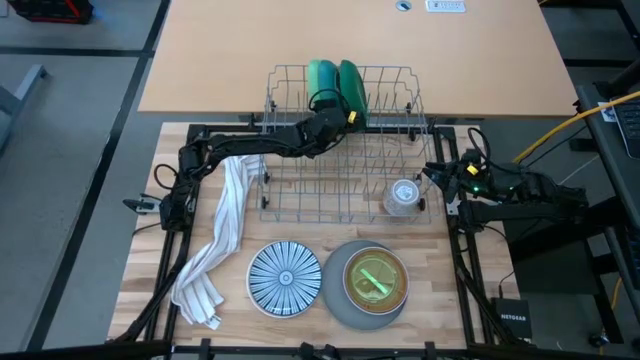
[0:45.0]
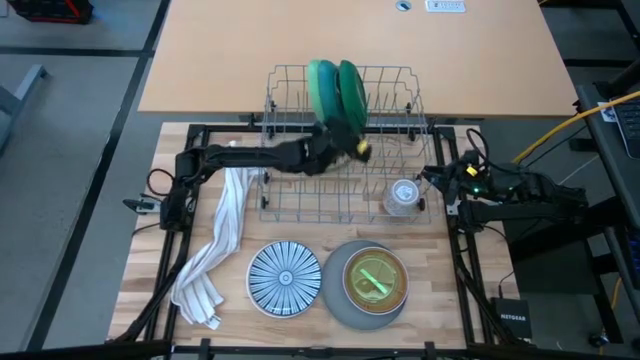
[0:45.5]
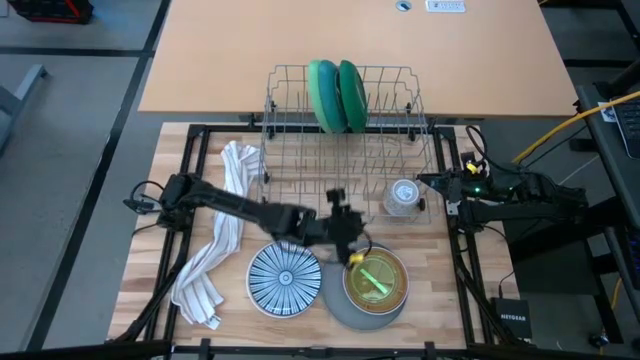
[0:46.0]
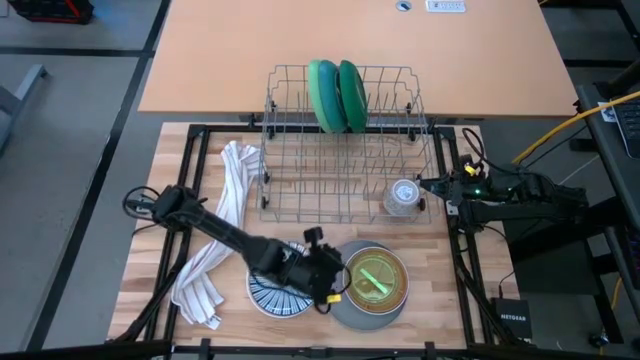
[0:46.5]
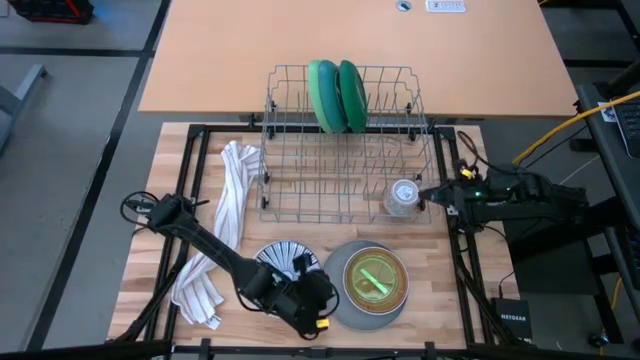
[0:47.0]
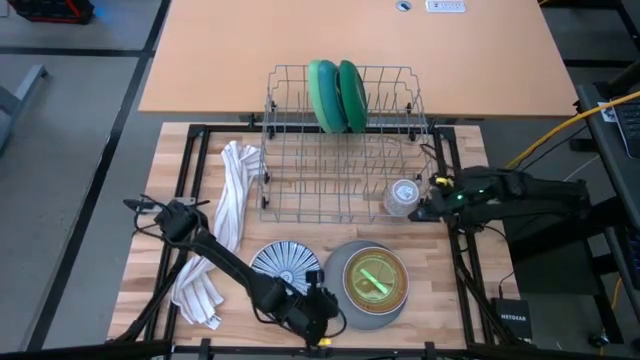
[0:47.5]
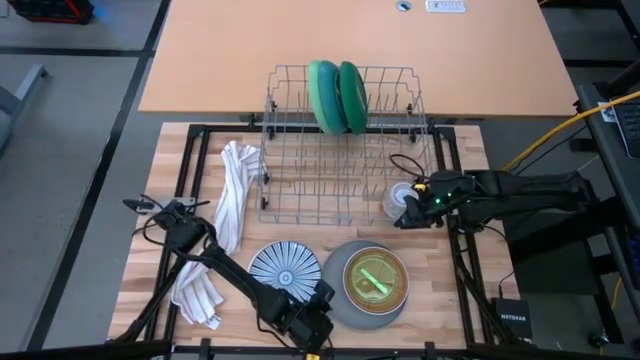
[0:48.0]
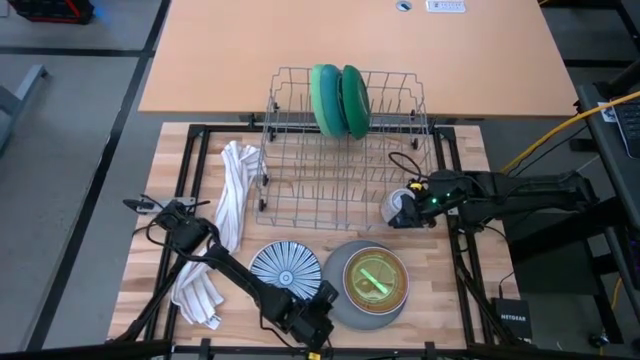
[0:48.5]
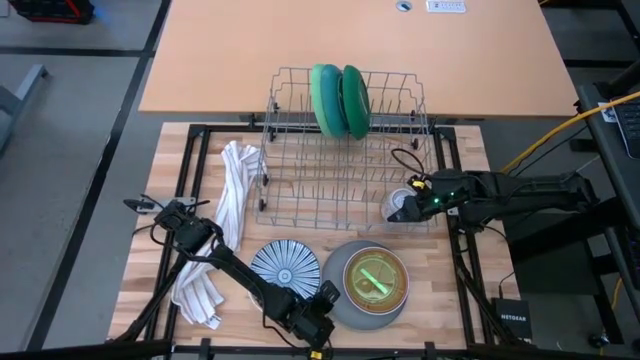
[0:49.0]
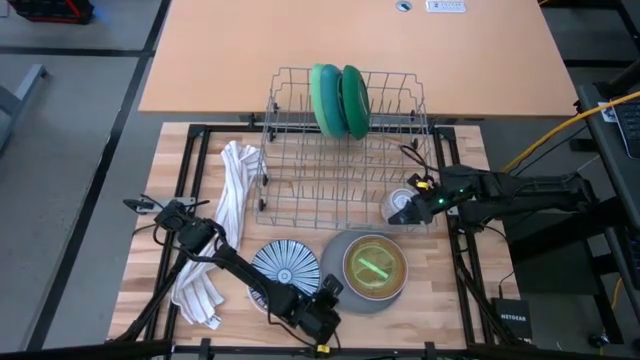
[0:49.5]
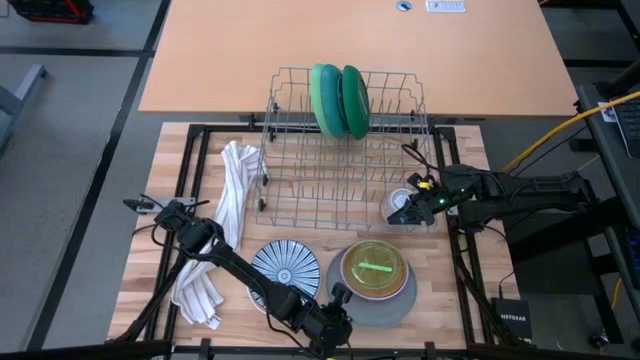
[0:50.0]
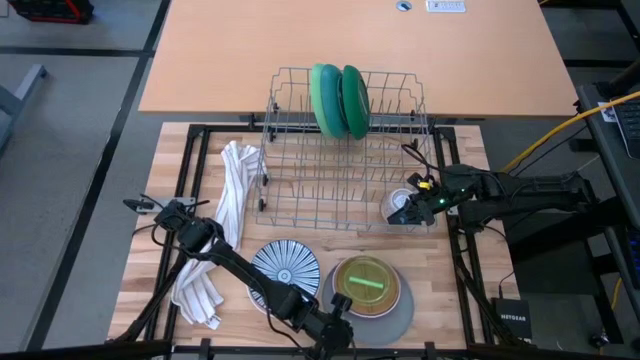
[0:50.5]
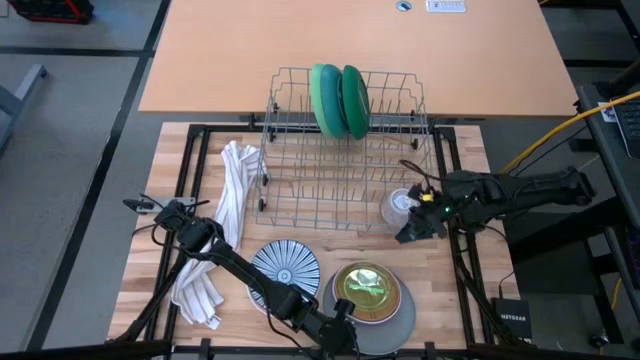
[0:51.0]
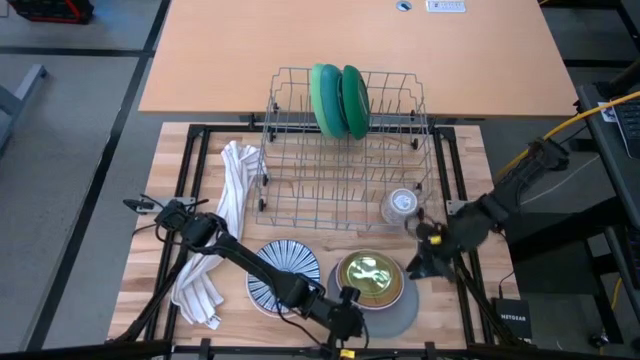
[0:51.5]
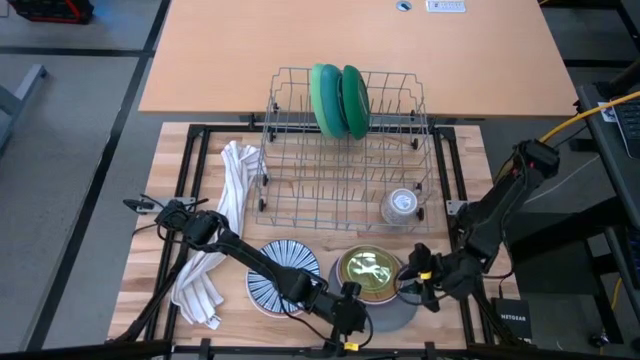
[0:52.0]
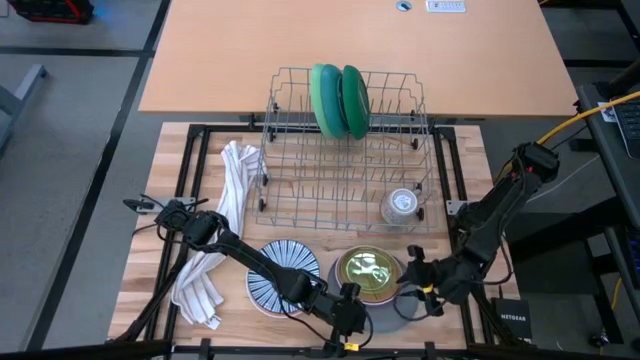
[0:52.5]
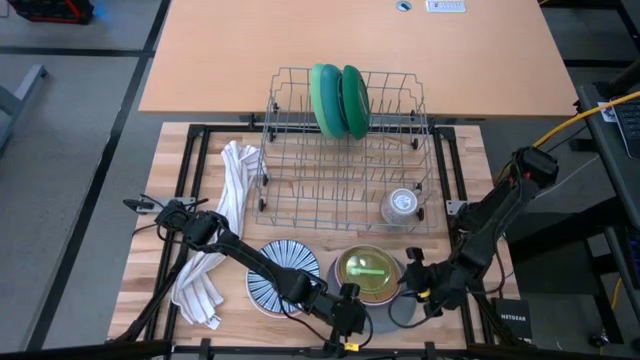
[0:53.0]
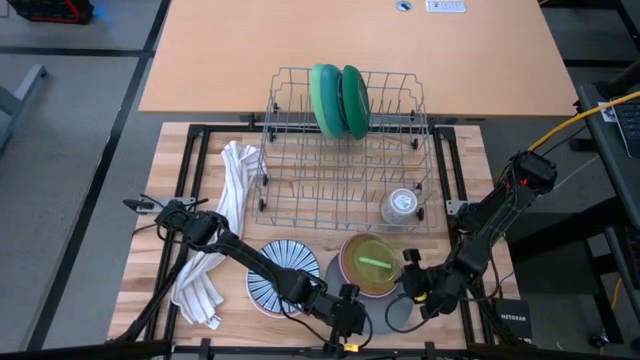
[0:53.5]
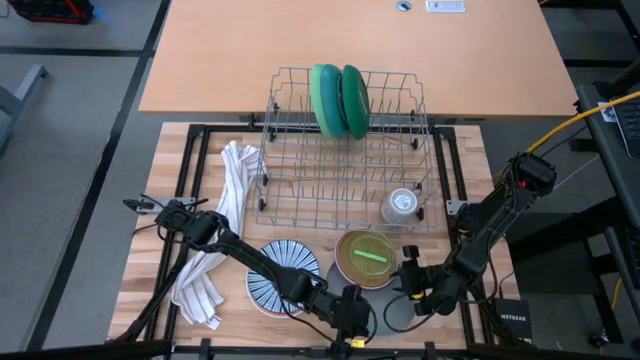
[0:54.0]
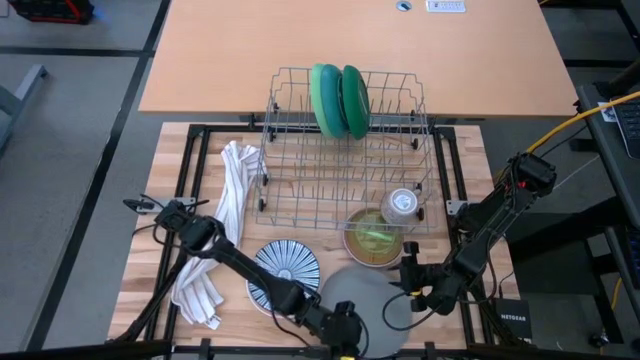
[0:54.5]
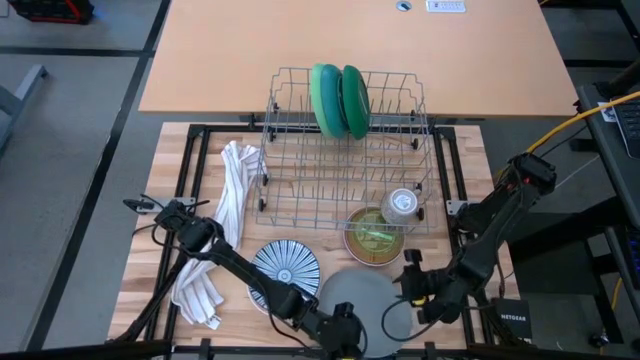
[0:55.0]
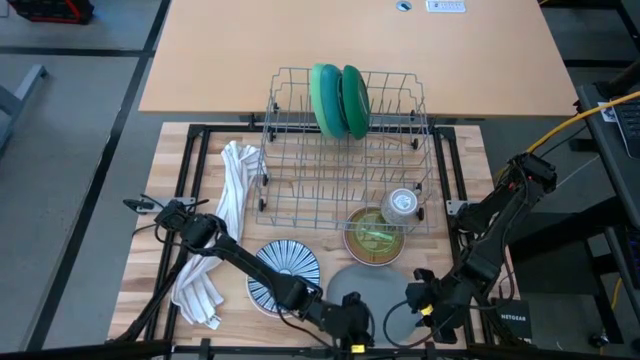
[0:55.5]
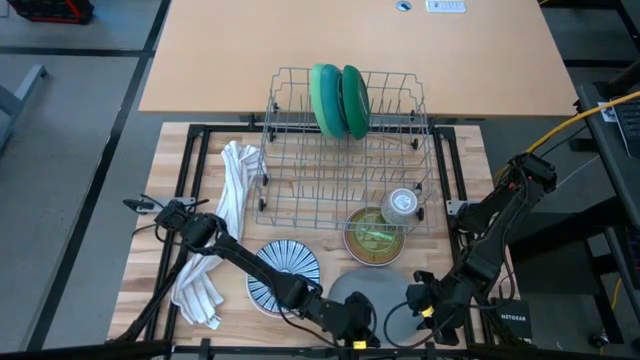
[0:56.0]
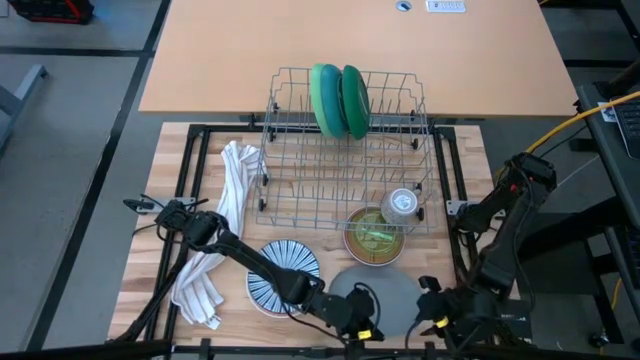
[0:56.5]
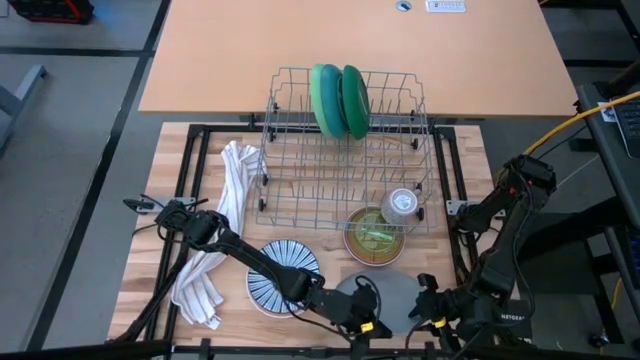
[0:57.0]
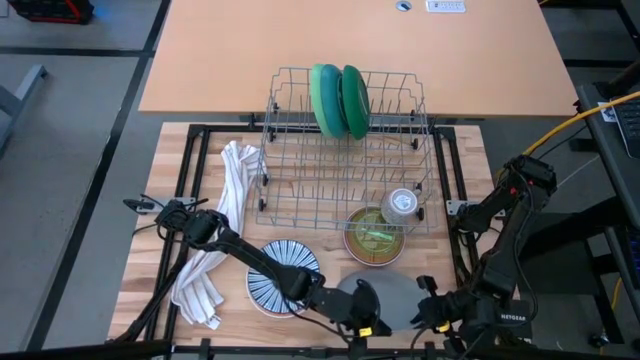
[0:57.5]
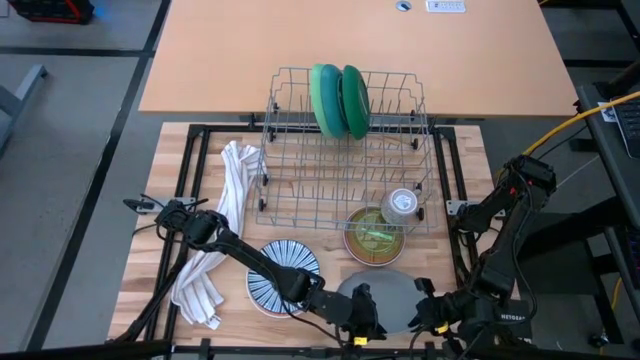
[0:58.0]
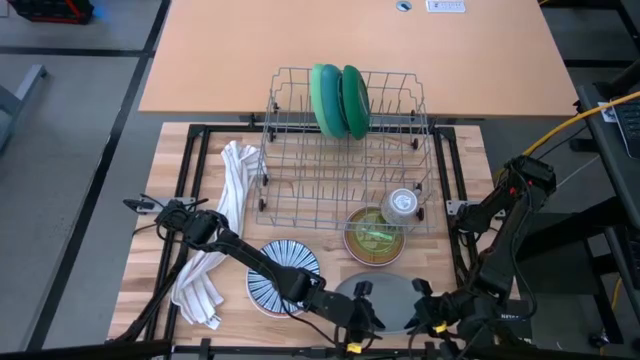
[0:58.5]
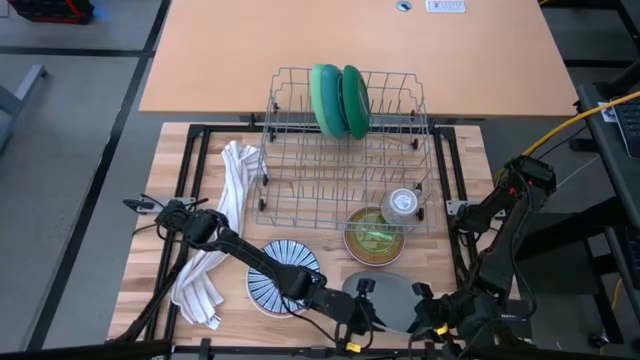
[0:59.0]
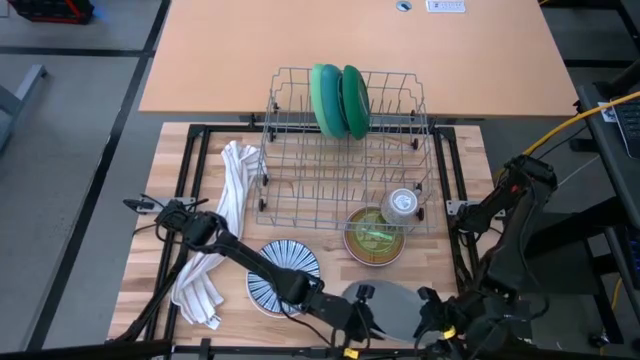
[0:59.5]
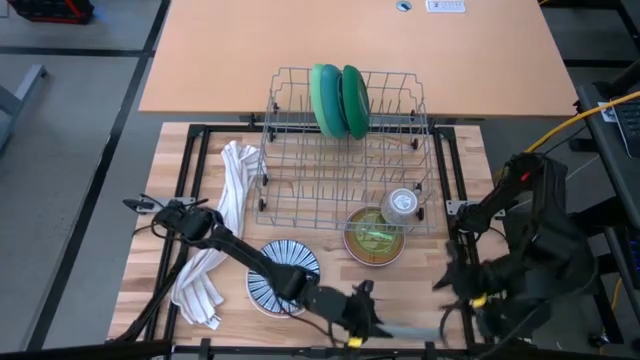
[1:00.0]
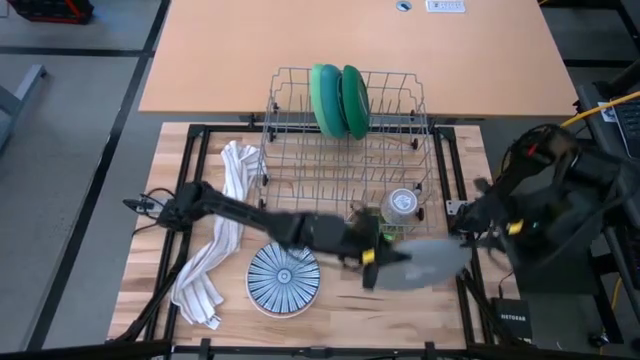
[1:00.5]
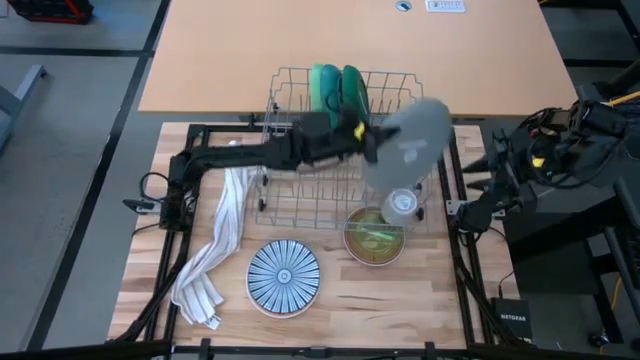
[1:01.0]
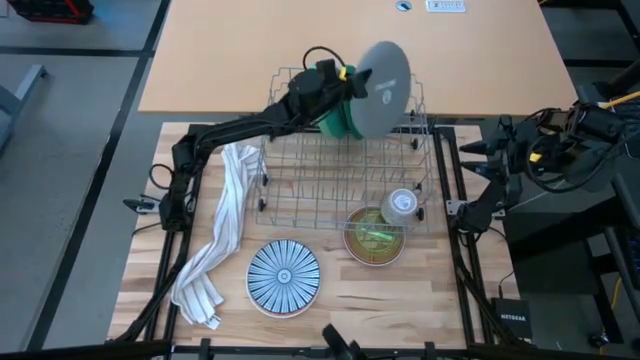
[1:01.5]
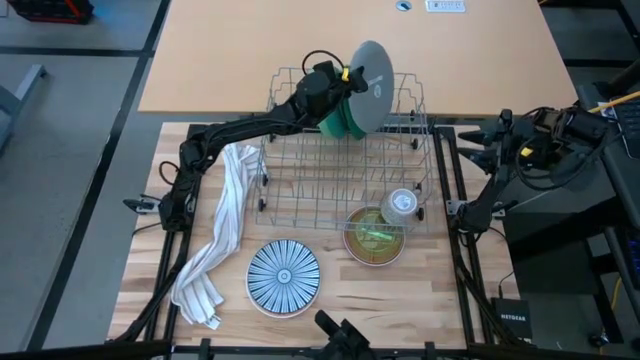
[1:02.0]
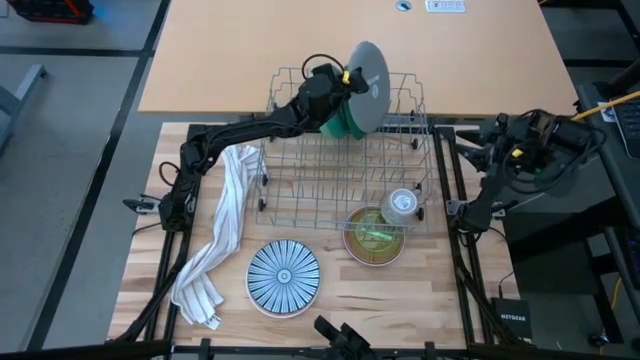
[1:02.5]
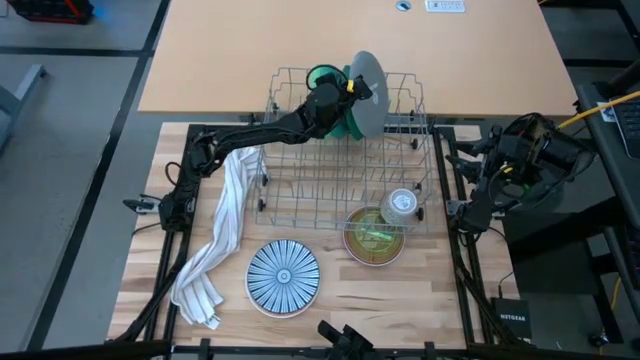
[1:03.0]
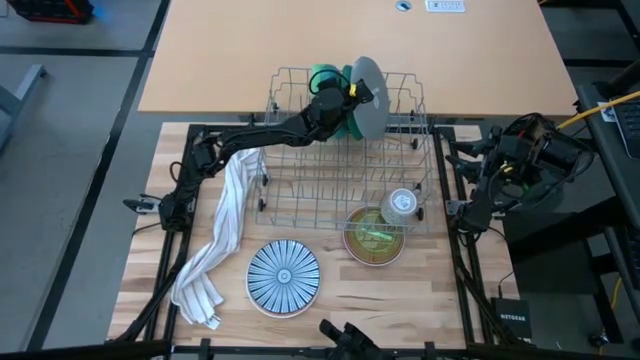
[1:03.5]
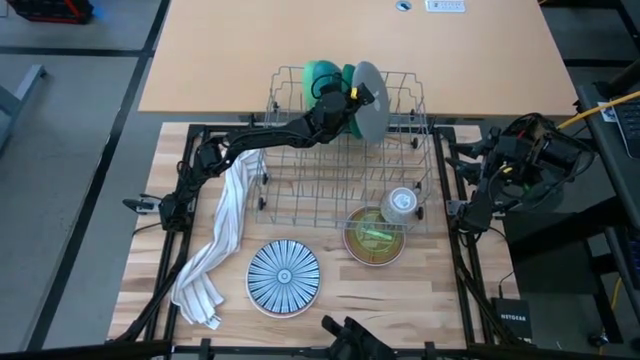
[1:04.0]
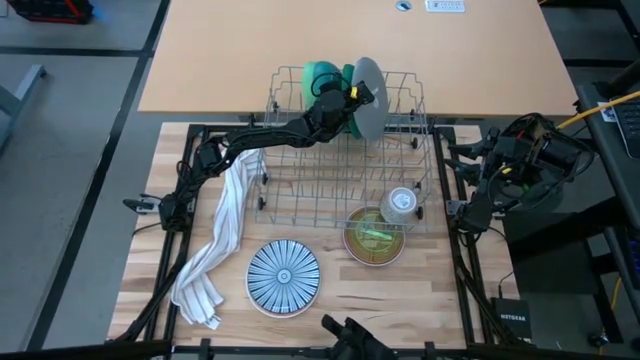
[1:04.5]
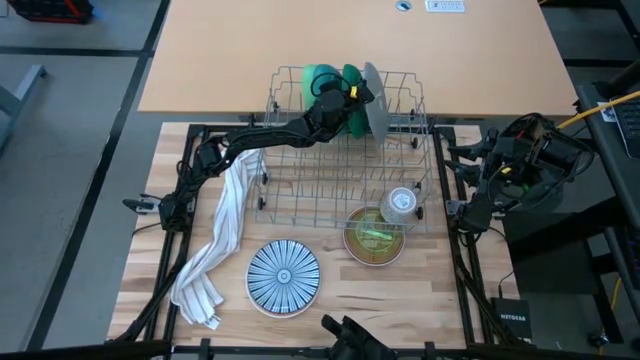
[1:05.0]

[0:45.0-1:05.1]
Task: Sort dishes
Put the gray plate into the dish rack
